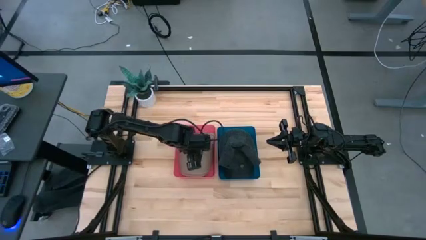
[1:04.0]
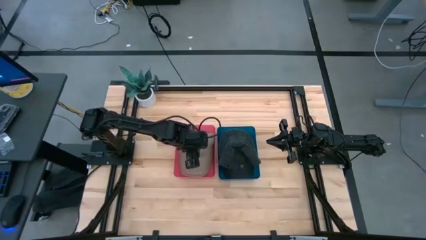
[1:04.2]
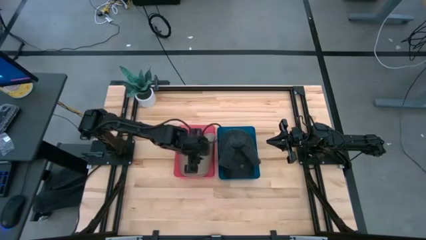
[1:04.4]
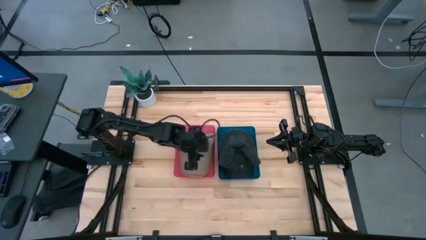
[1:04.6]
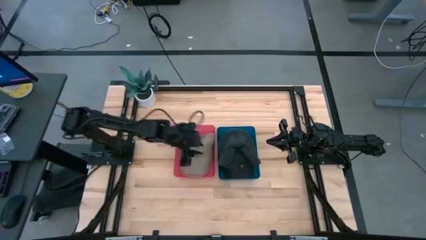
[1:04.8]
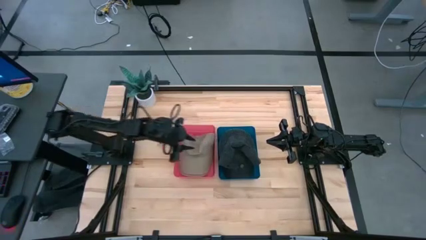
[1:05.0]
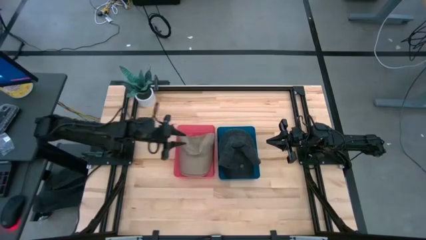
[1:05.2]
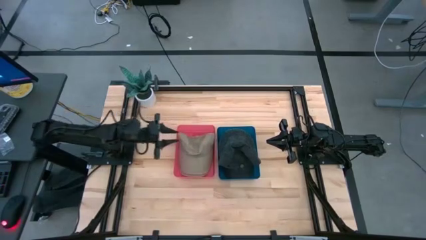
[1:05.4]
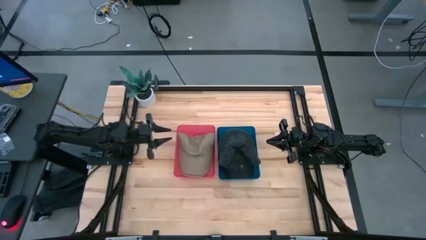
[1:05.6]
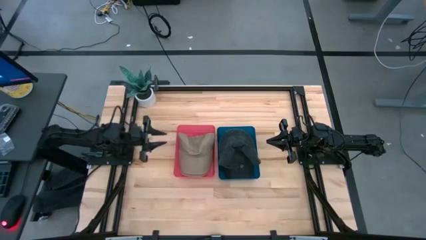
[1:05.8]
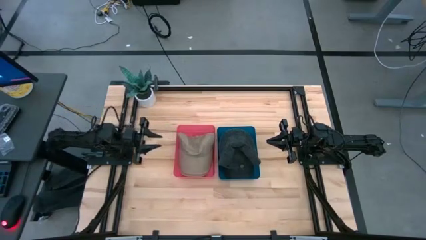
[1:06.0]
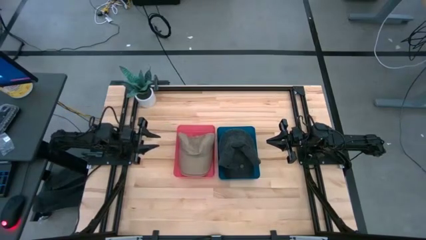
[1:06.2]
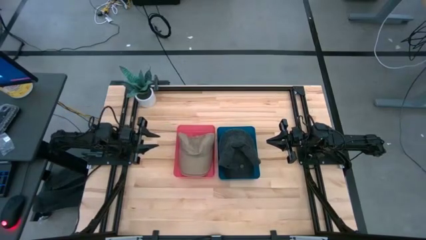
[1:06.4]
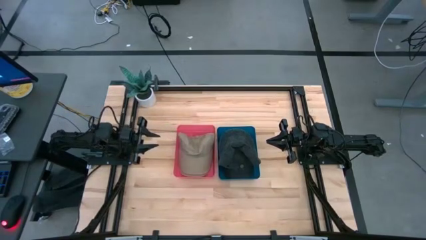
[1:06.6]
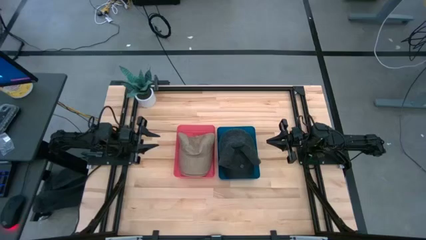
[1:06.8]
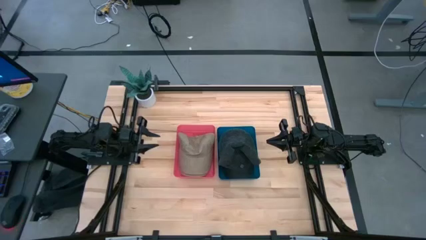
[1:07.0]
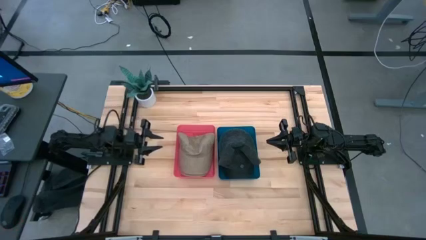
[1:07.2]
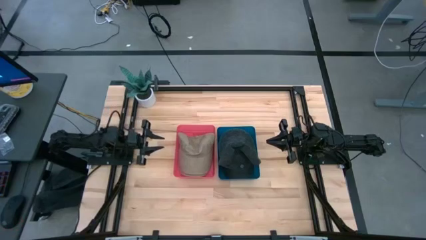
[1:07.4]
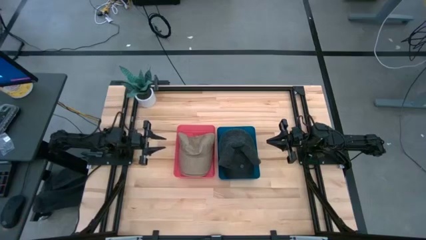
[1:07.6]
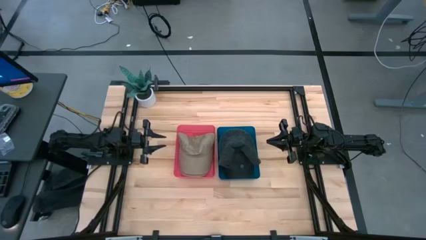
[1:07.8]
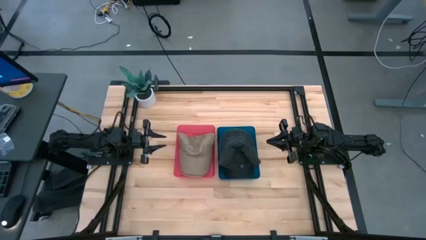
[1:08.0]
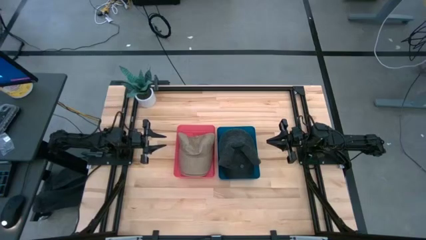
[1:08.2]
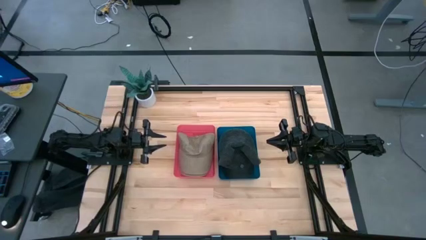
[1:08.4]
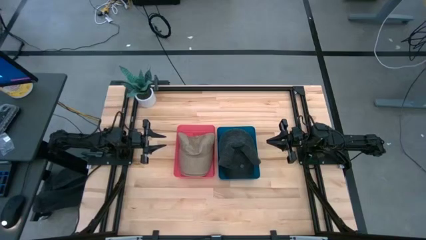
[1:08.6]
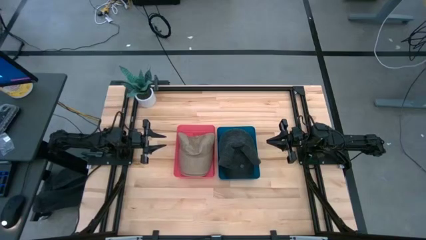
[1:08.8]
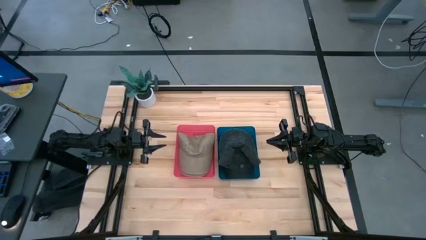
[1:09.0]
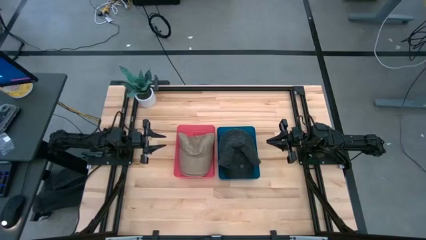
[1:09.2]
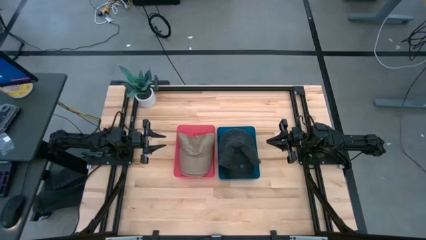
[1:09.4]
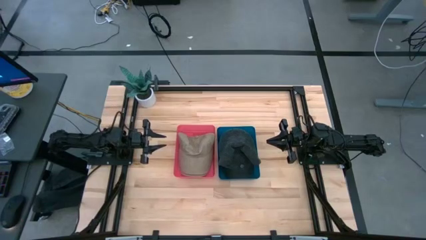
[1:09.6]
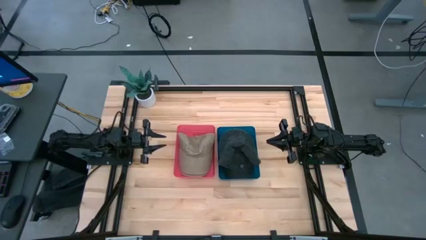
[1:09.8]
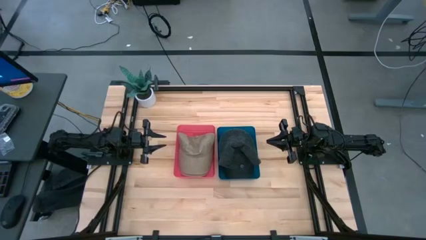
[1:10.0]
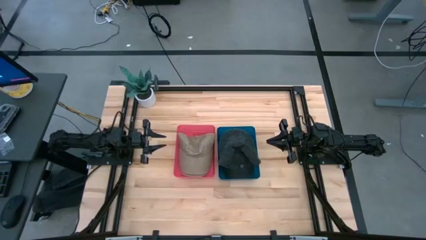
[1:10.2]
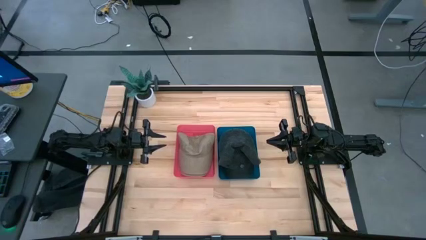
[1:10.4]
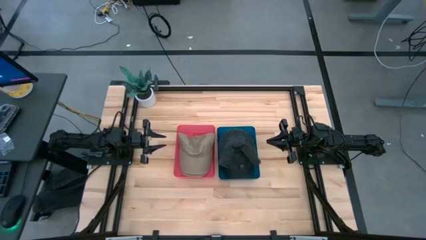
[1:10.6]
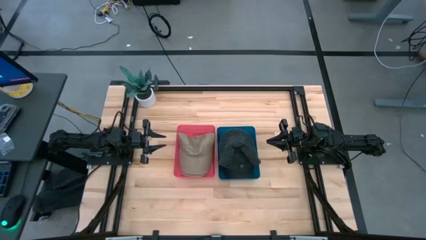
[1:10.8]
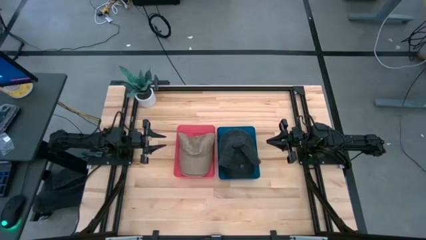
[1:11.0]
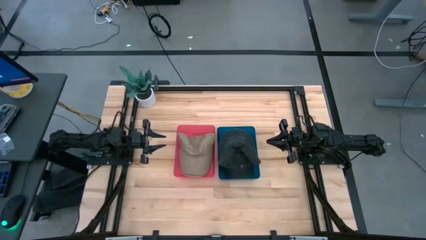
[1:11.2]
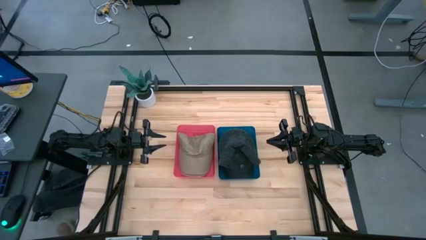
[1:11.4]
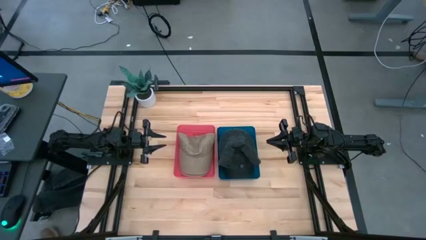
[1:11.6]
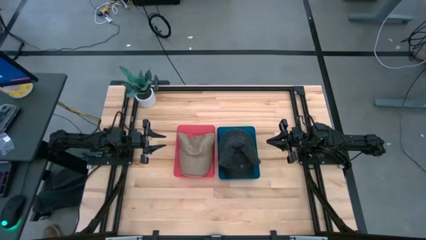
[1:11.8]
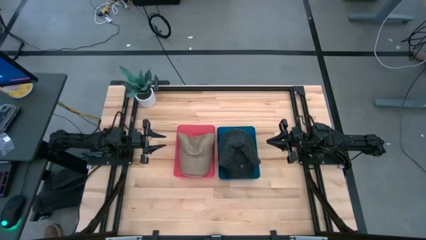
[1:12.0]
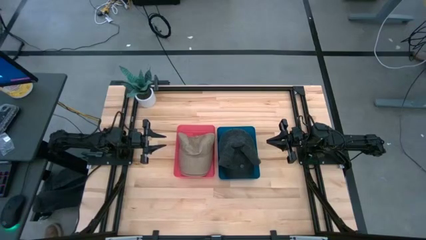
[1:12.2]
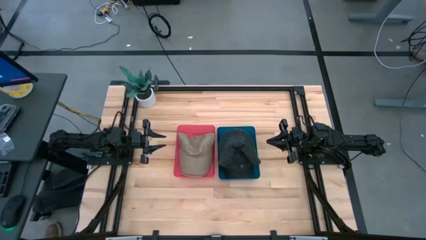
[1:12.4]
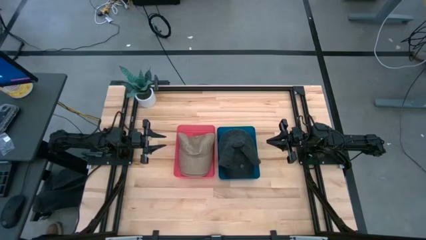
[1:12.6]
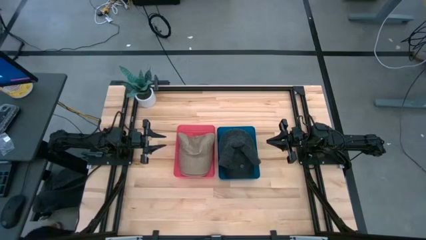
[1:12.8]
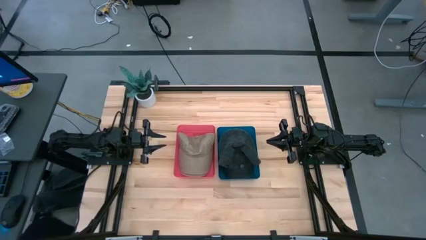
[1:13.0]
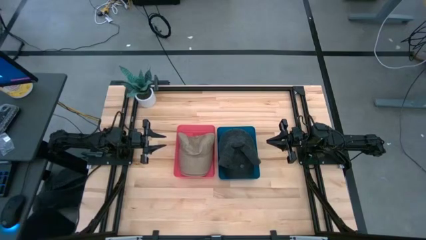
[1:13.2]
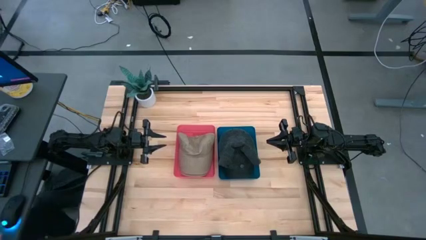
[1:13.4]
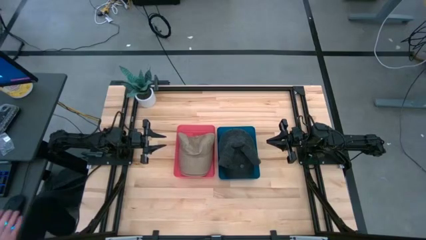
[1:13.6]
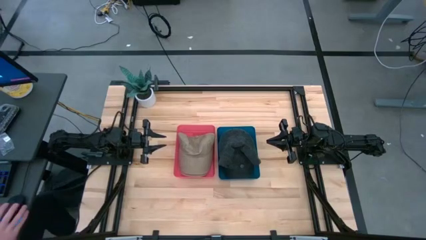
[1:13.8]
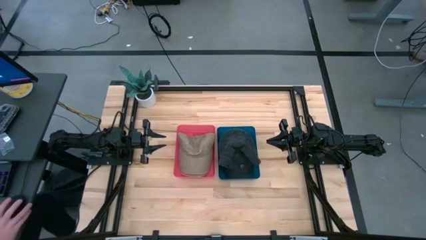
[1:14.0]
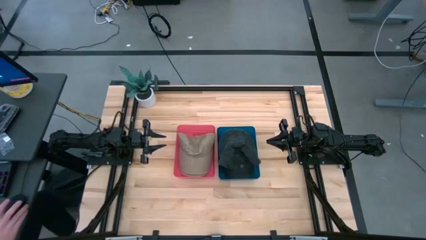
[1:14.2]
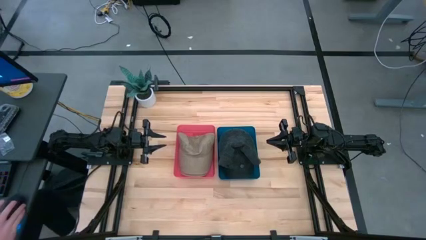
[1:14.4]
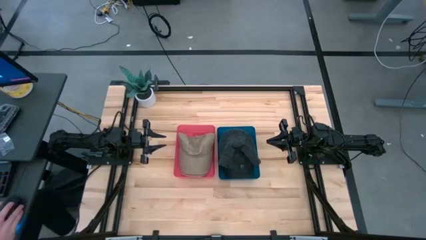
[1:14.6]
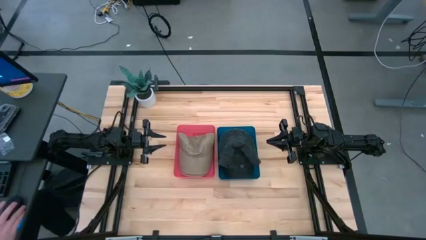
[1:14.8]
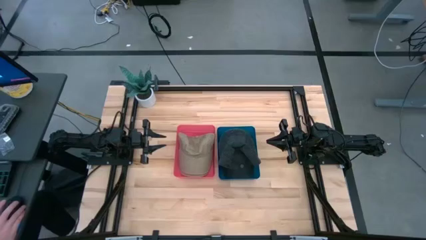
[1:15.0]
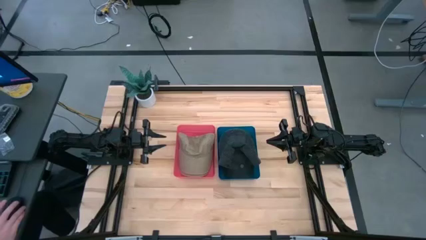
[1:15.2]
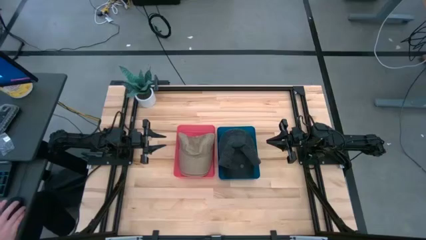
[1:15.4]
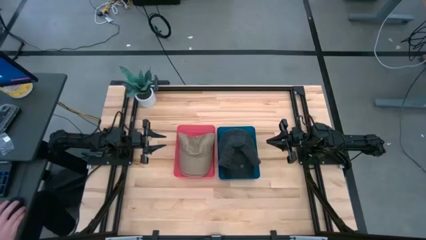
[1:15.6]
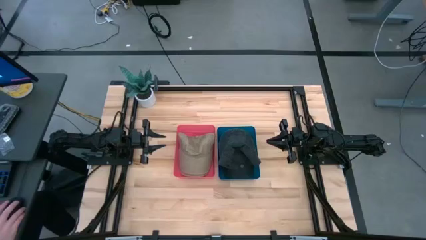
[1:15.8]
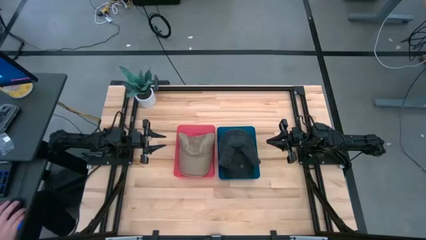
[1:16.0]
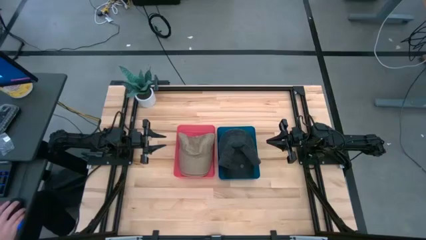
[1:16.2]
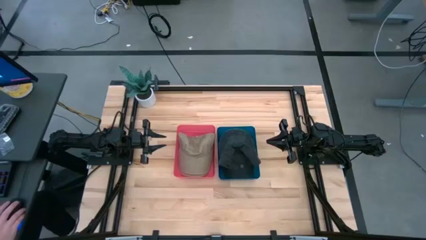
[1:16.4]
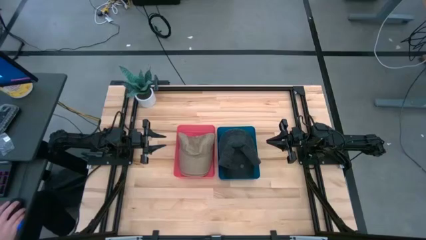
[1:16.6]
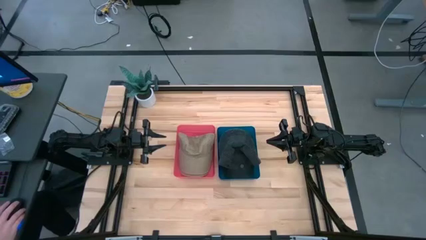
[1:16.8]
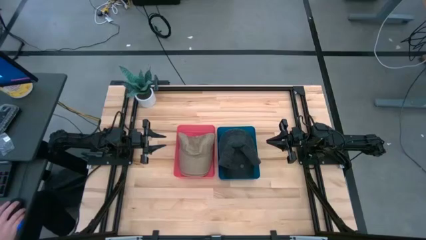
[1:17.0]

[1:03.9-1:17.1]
Task: Pick & Place hat
Return to Home Position

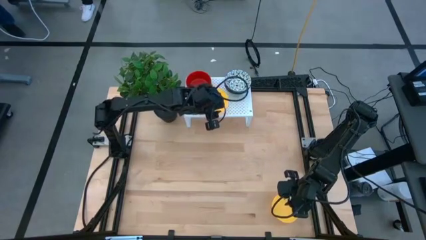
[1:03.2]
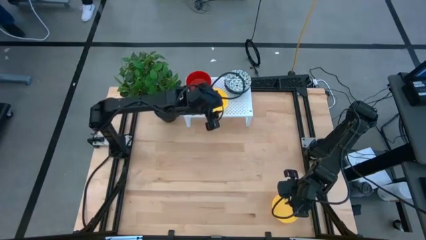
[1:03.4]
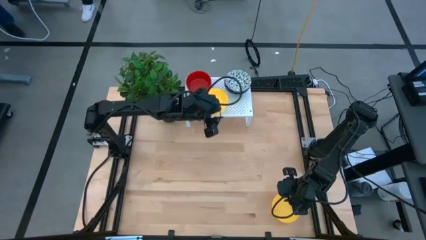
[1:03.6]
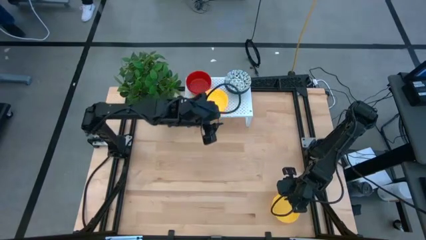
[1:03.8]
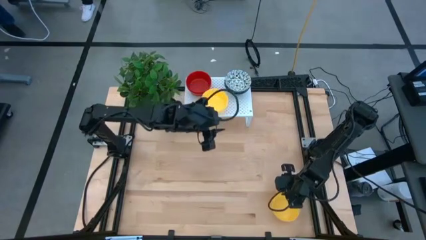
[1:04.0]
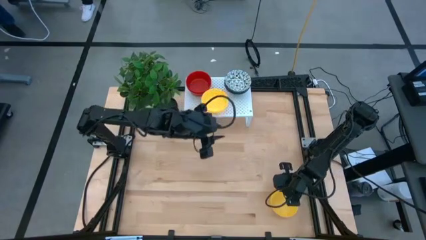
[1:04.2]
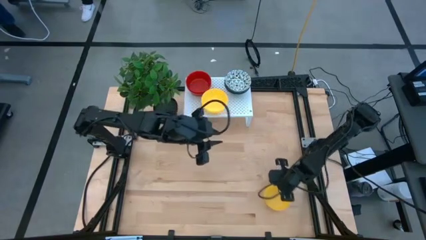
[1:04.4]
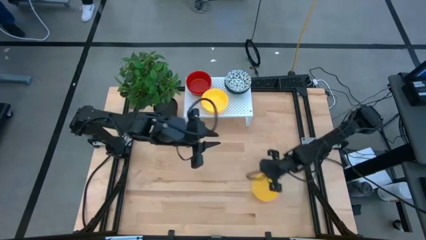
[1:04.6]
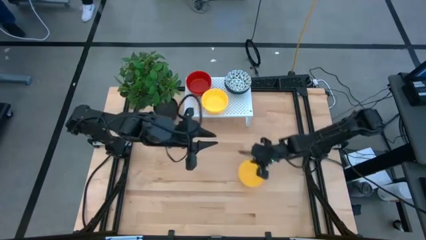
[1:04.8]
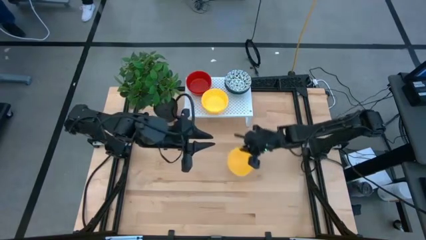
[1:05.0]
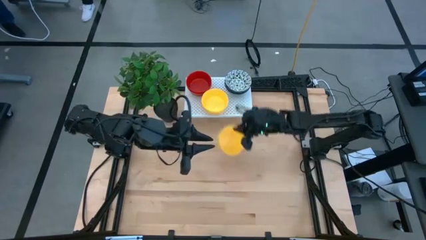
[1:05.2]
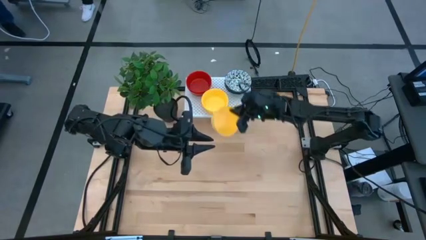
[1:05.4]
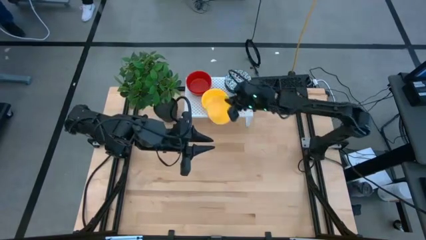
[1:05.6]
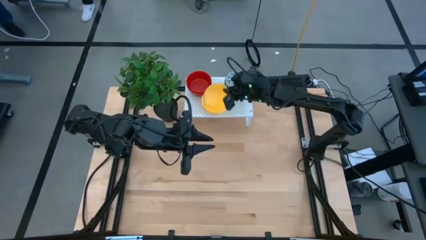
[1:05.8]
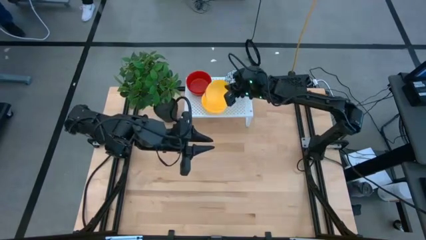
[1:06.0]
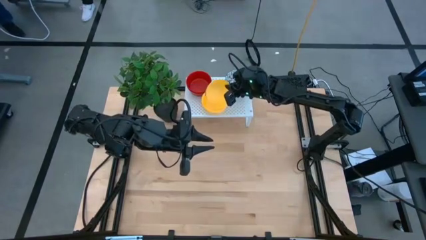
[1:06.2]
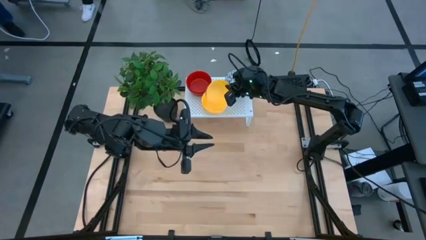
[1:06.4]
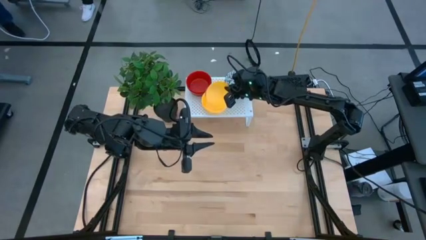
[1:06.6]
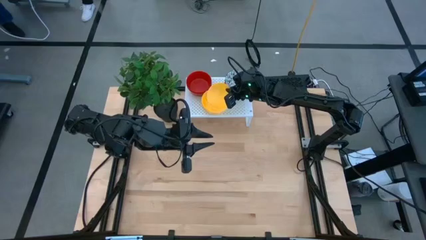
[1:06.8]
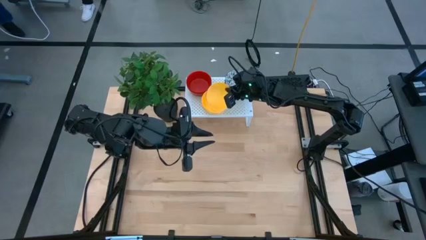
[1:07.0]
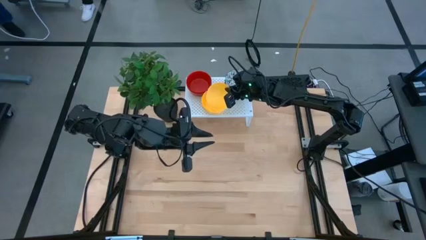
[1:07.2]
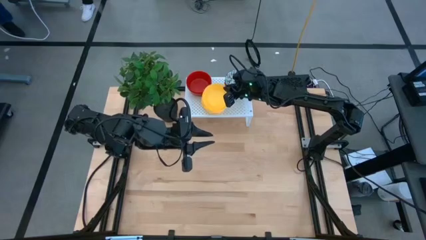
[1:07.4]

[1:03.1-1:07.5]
Task: Pick & Place Mini bowls
Stack the yellow bowl on the yellow bowl on the shelf
